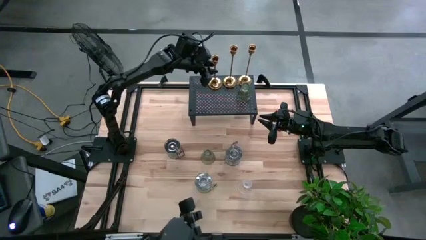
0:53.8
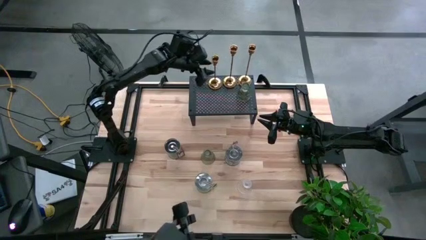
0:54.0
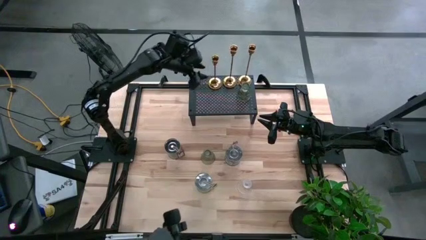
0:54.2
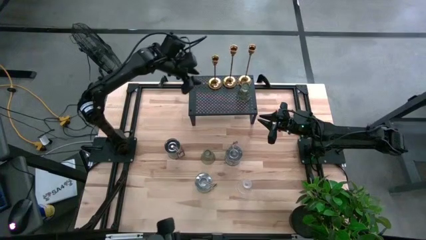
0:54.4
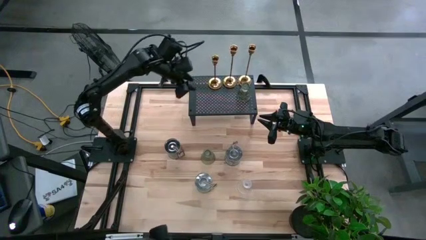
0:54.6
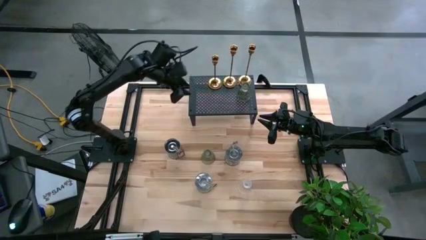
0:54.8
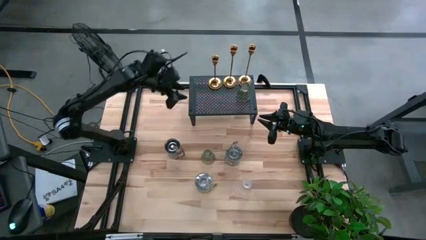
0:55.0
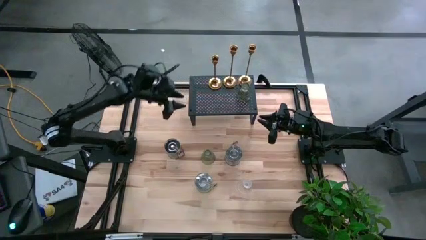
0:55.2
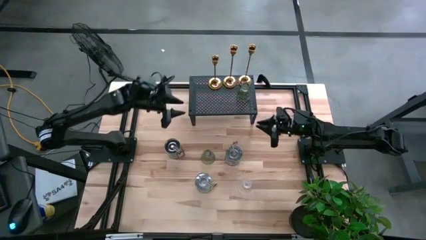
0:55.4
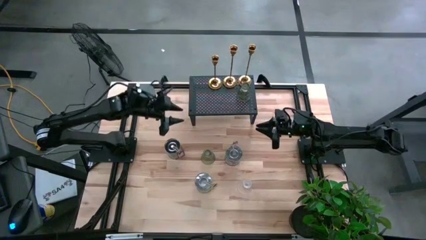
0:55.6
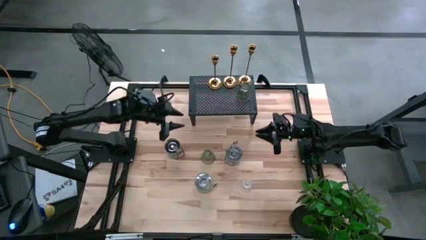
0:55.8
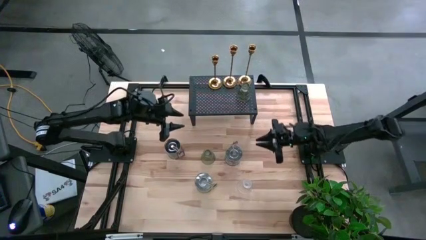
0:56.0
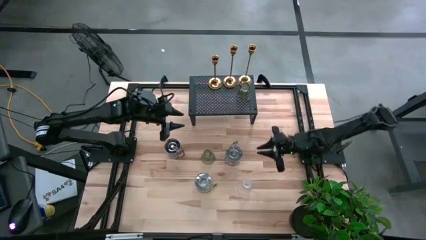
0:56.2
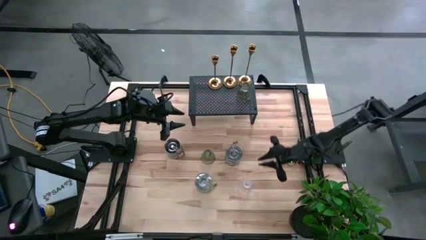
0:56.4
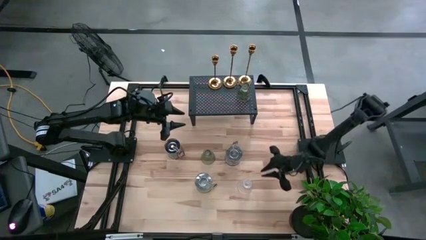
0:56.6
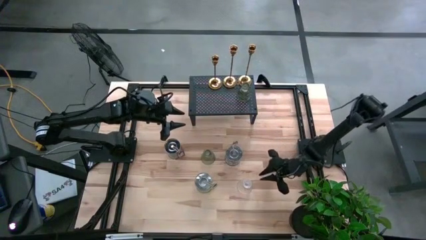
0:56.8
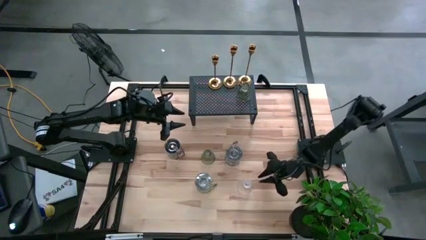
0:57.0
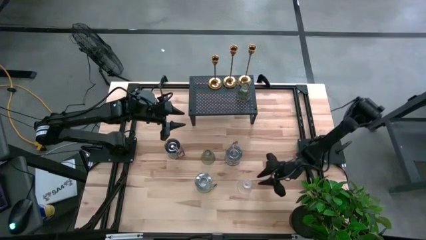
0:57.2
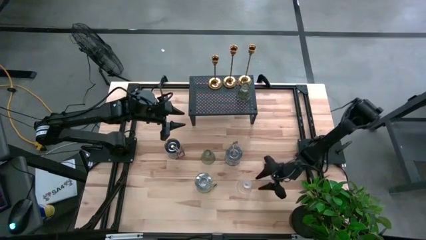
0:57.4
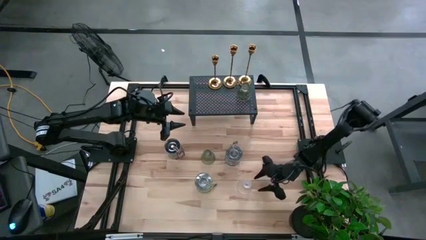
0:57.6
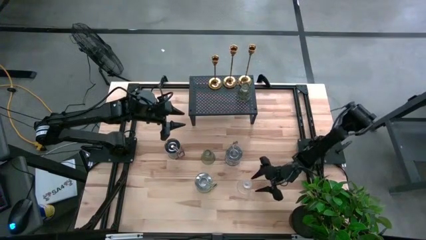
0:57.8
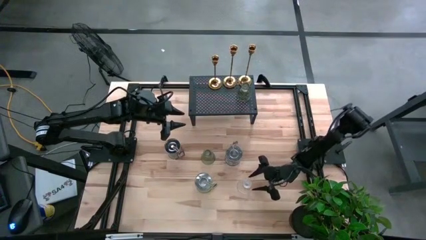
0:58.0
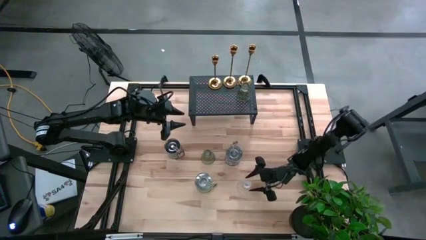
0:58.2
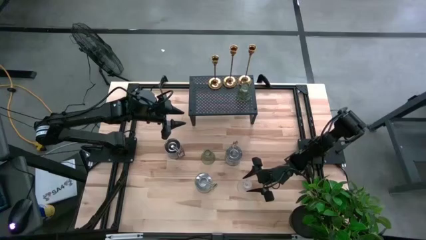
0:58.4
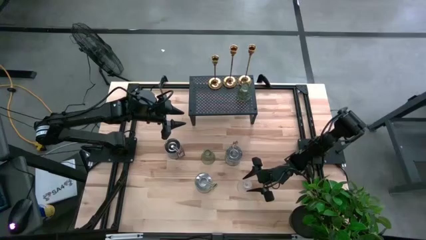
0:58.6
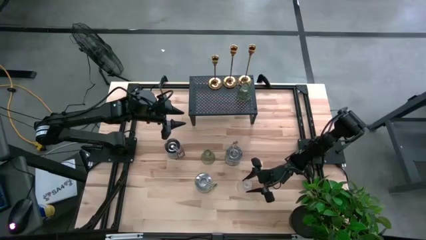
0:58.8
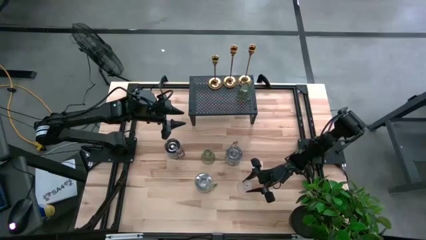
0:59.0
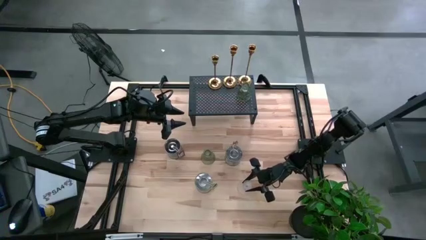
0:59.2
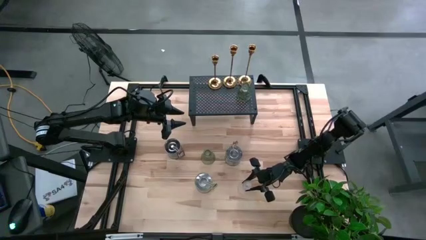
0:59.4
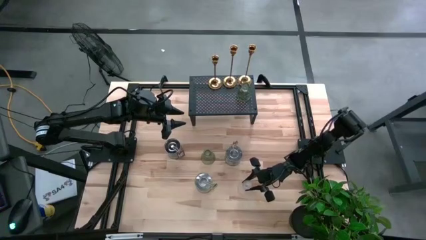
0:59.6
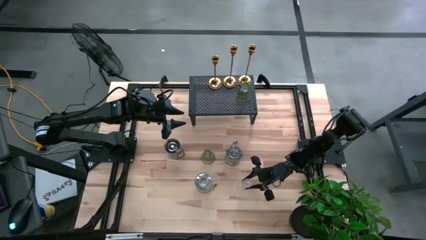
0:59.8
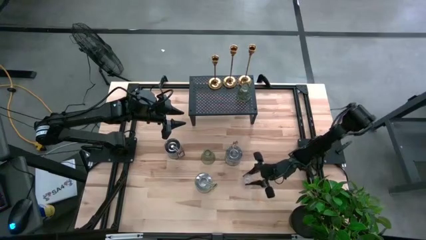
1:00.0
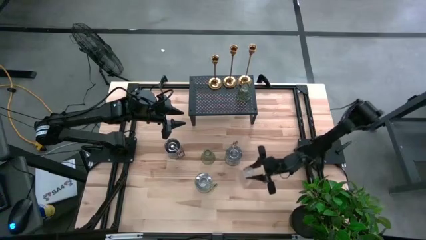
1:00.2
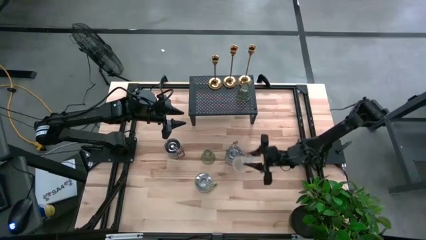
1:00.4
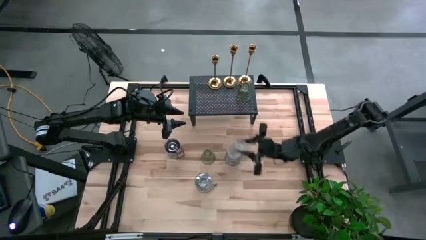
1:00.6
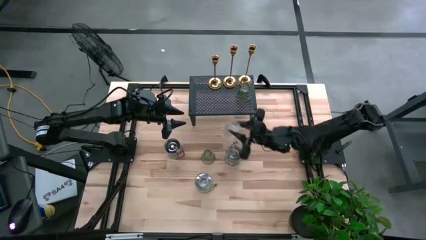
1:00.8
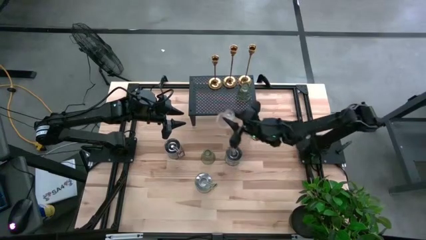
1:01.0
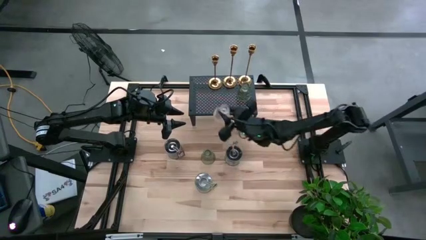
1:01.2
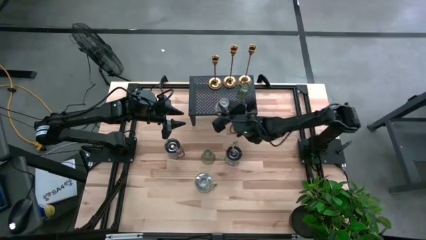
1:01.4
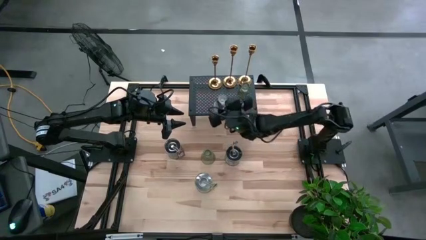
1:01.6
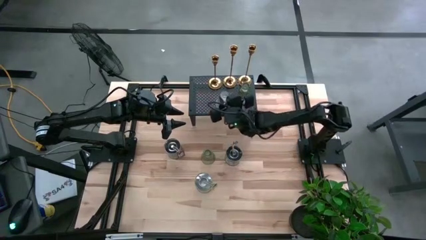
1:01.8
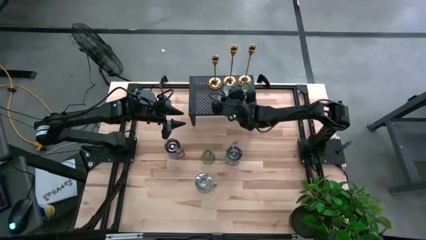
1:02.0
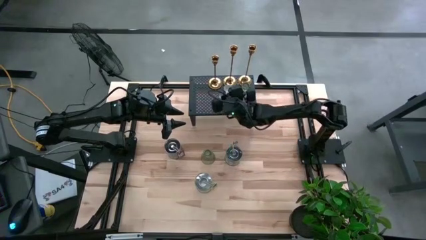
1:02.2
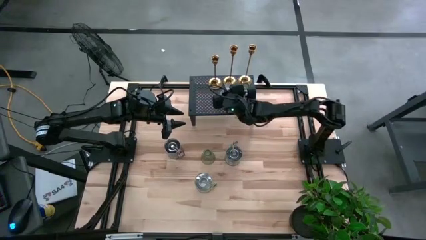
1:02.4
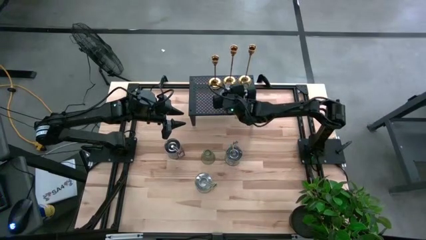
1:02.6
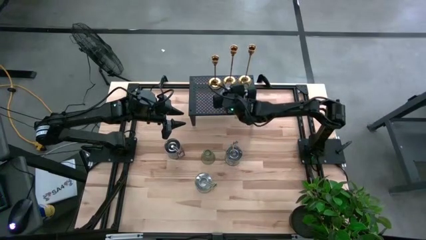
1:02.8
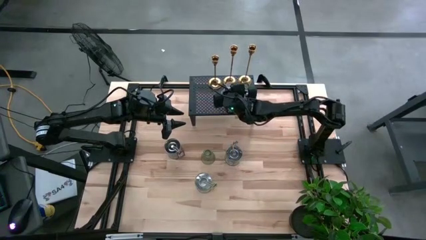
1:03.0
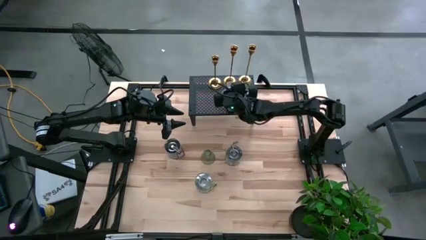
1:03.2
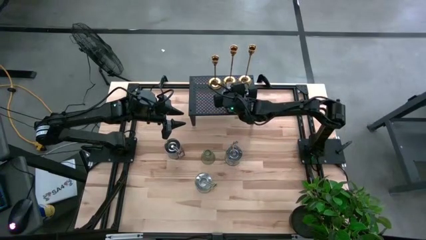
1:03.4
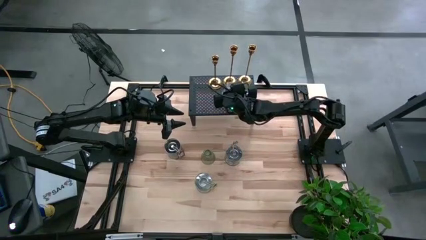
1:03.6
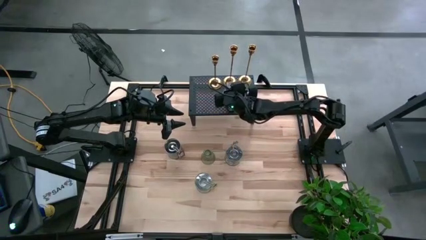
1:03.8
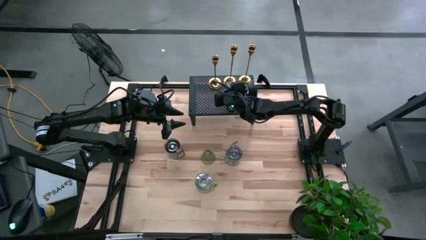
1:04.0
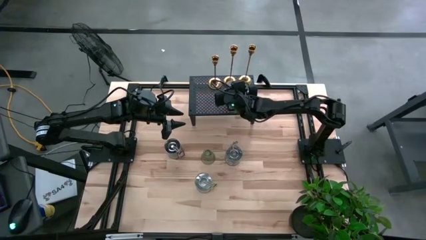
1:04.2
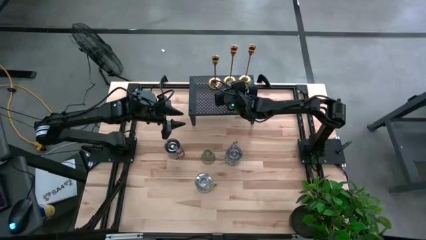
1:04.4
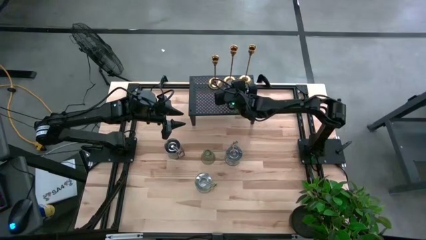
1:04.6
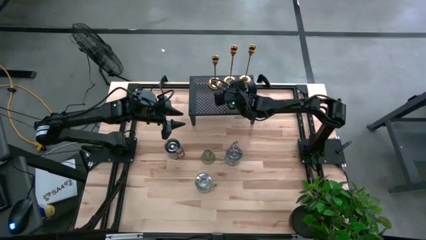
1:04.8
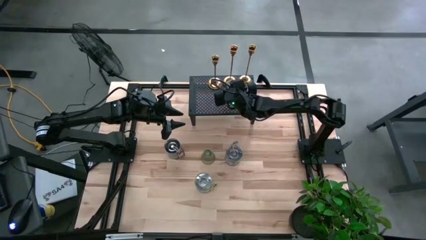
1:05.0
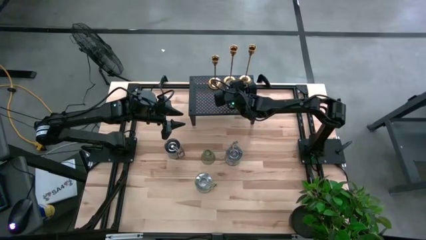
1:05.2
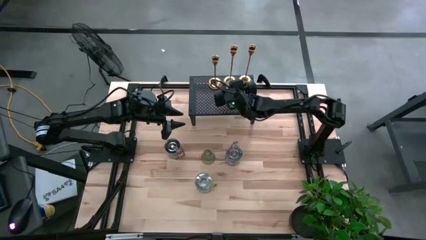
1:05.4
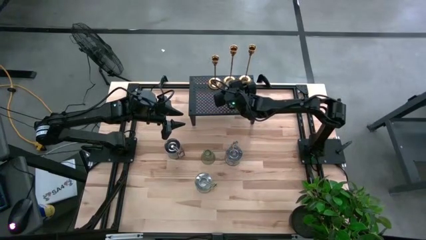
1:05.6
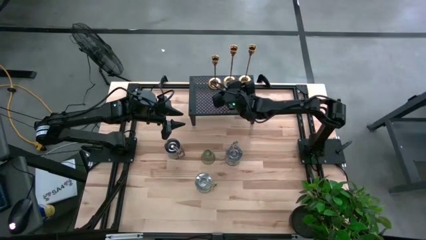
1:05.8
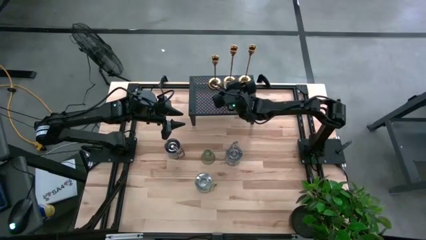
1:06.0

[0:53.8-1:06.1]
Task: Pick & Place candle stick holders
Put the transparent candle holder on the shelf aligned with the green candle holder
